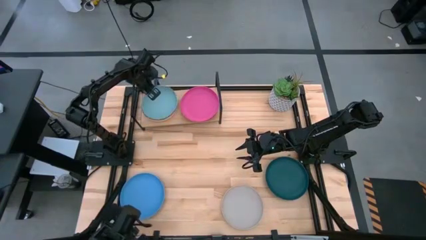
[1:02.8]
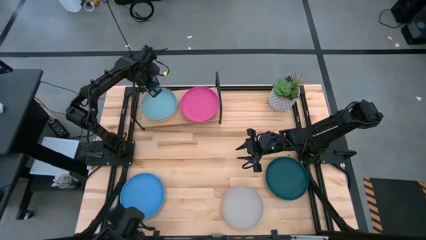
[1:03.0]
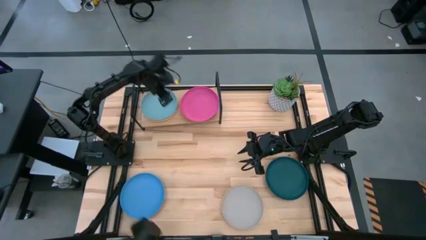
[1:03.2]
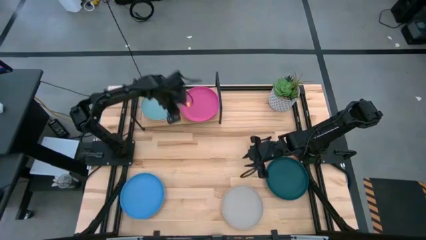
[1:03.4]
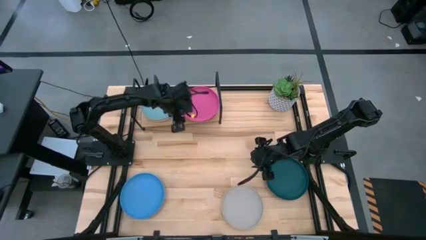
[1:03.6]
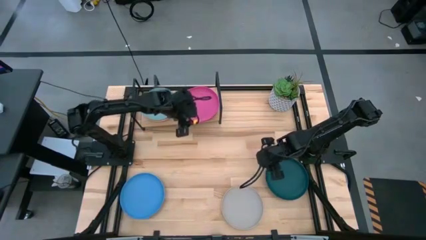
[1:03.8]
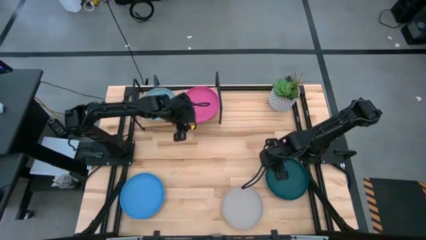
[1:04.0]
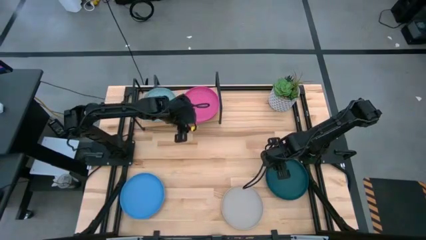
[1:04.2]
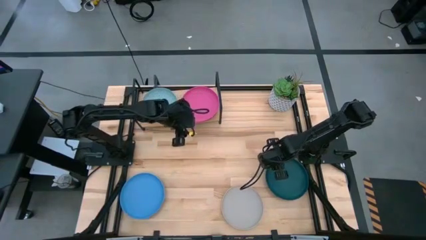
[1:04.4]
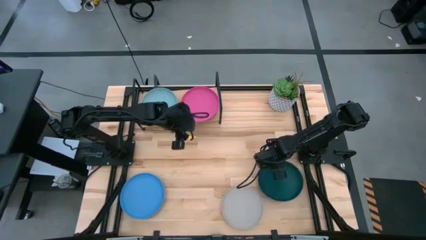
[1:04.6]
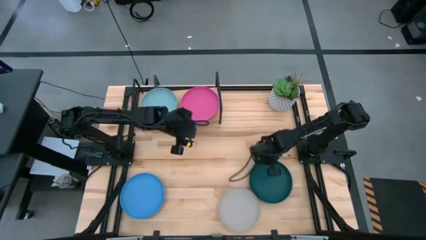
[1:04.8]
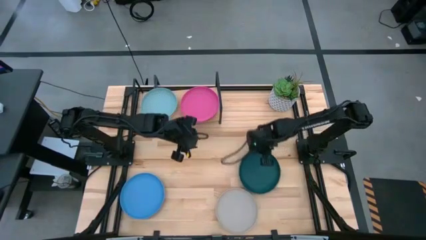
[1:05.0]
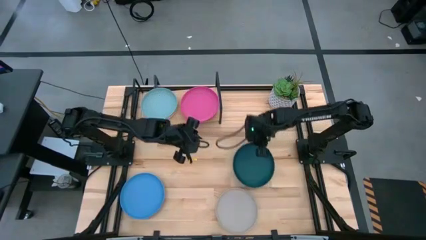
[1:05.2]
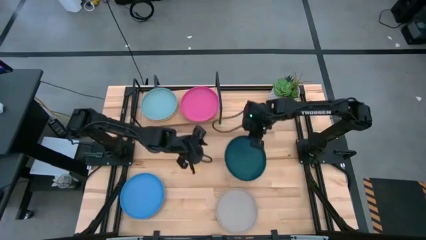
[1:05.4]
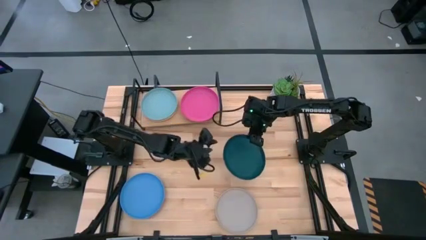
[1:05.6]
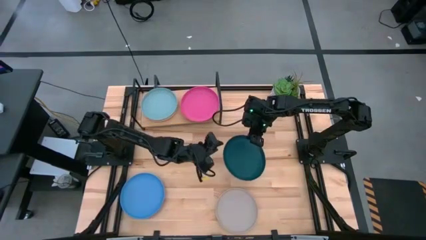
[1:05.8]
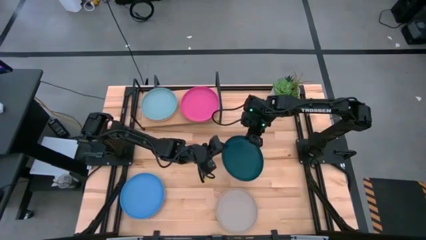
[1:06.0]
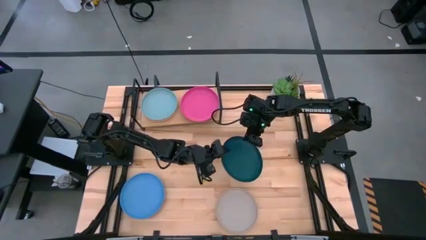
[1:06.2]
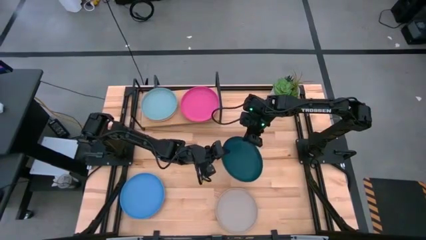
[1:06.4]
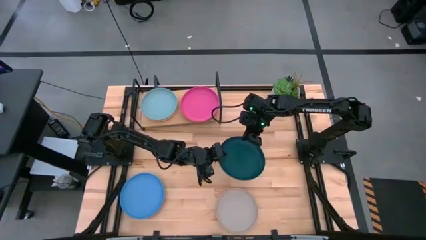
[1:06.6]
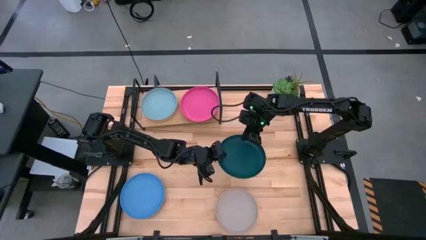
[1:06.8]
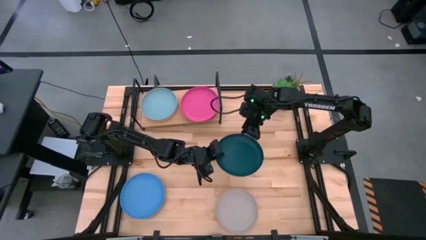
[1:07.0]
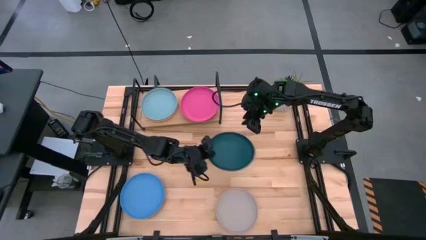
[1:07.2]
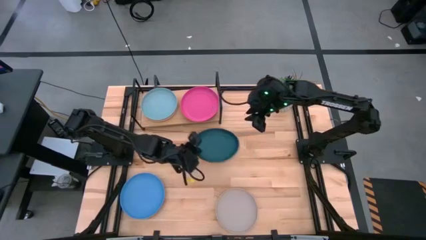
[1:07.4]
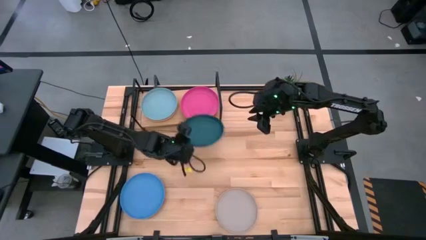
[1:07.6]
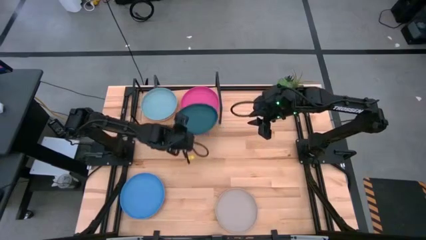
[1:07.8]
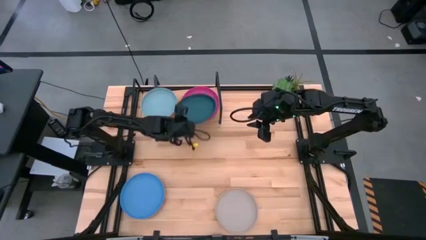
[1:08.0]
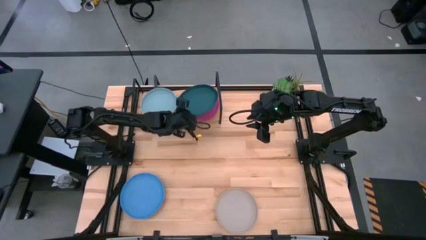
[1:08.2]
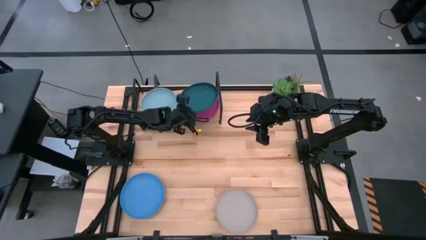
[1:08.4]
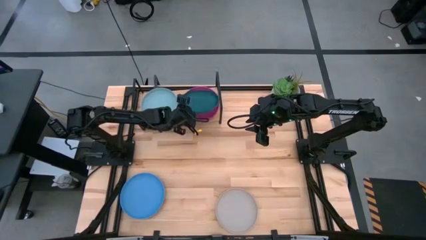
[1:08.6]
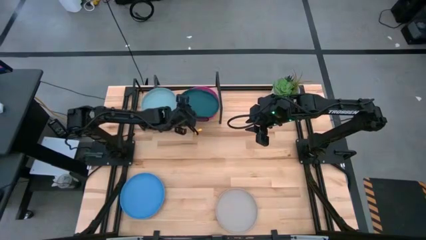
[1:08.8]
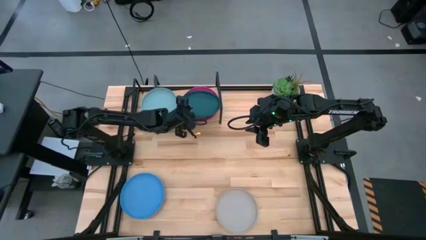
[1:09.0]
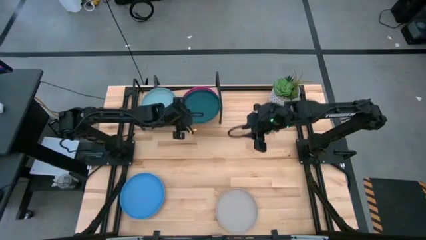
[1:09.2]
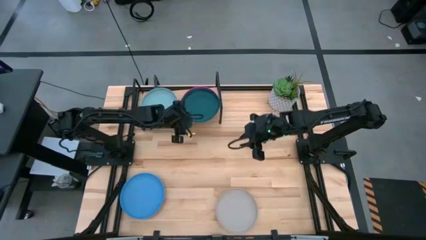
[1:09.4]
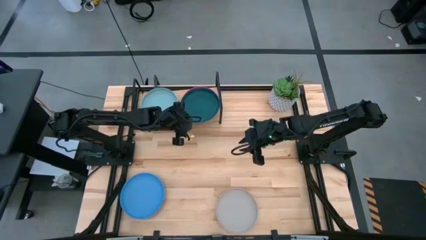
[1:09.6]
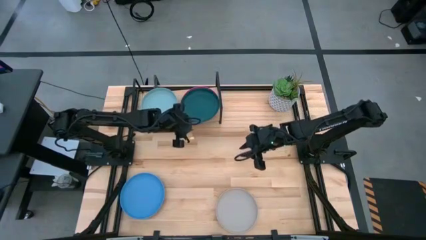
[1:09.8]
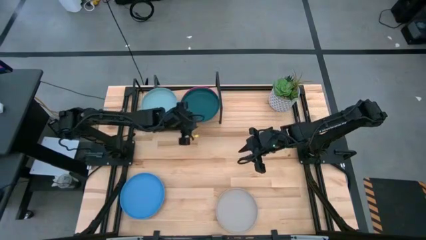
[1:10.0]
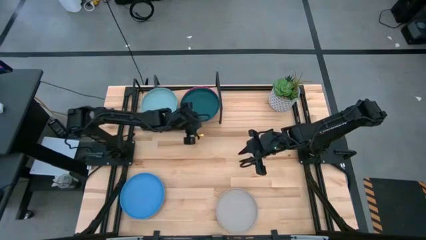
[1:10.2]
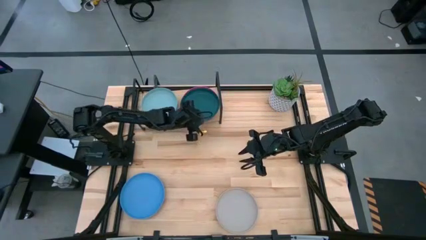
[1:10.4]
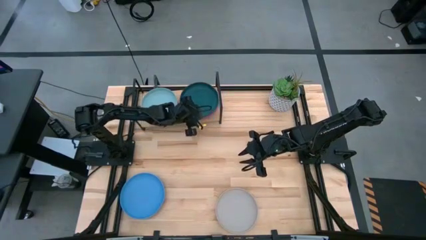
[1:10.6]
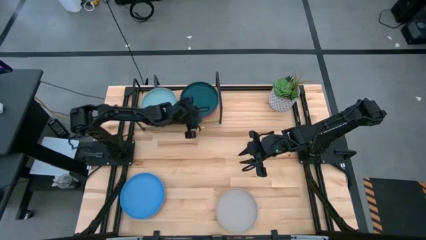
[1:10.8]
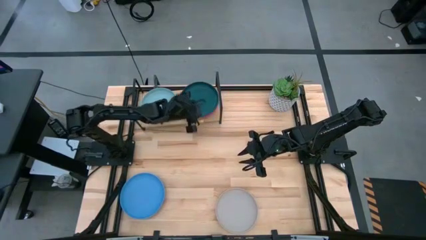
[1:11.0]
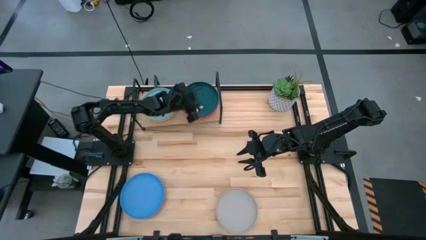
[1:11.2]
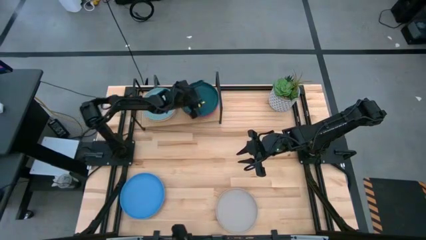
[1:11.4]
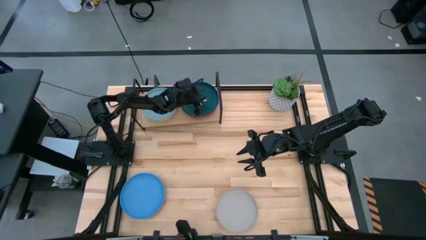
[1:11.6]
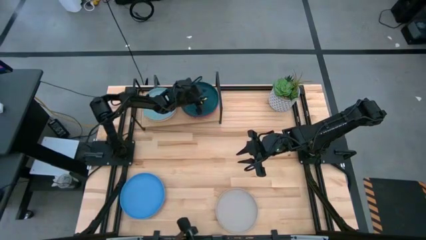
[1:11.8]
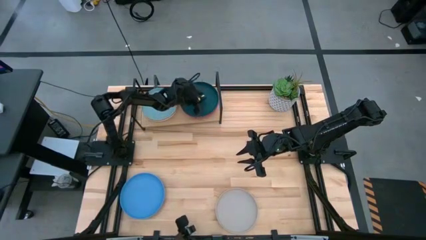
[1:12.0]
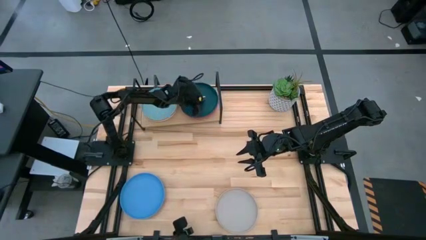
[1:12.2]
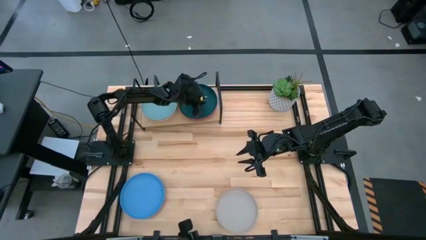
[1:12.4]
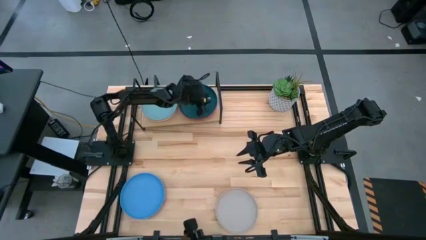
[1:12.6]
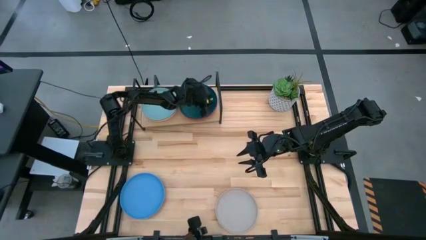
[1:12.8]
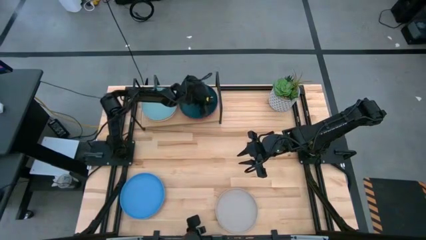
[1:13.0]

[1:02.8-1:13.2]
Task: Place and stack plates onto a shelf
Stack the dark blue plate on the pink plate

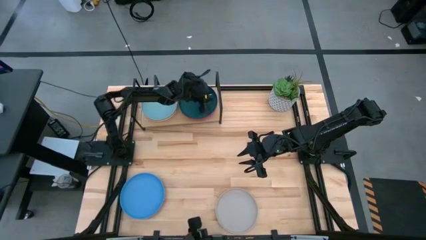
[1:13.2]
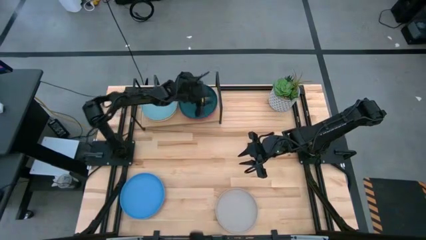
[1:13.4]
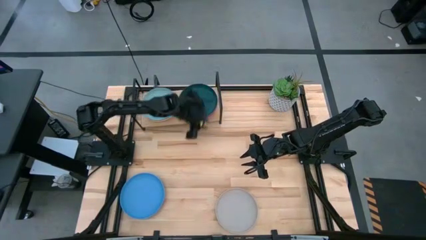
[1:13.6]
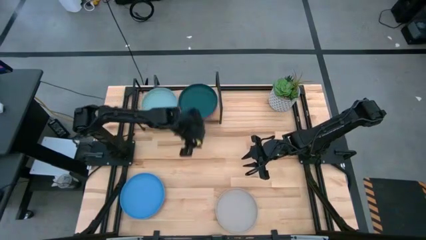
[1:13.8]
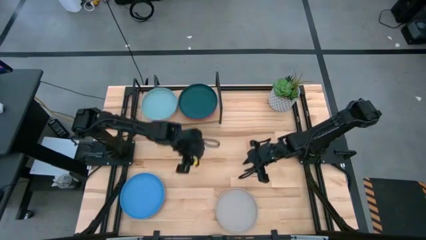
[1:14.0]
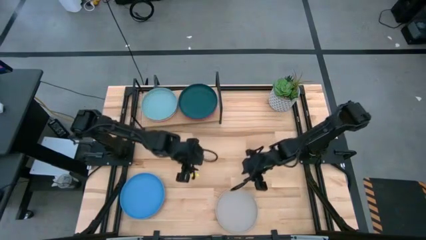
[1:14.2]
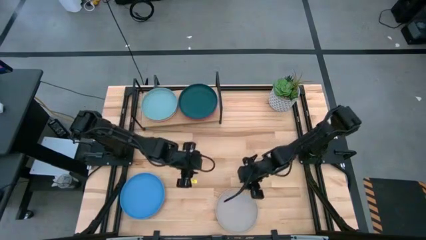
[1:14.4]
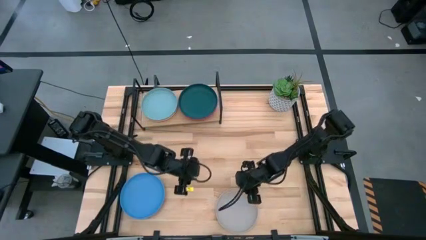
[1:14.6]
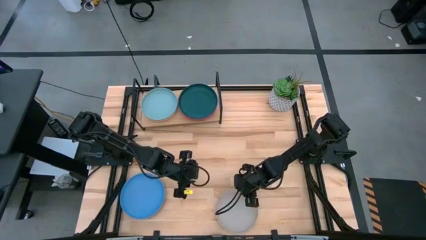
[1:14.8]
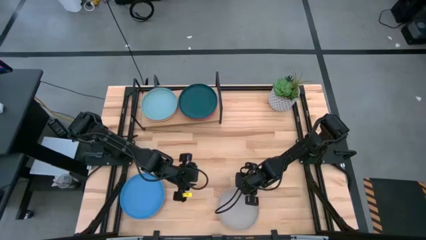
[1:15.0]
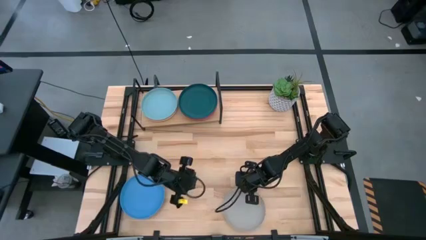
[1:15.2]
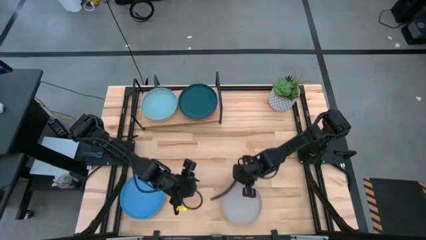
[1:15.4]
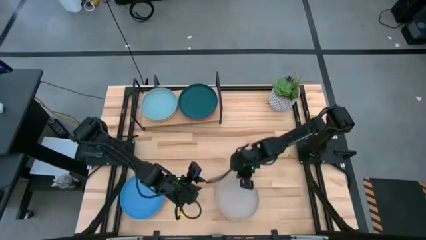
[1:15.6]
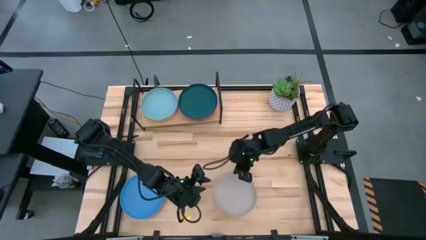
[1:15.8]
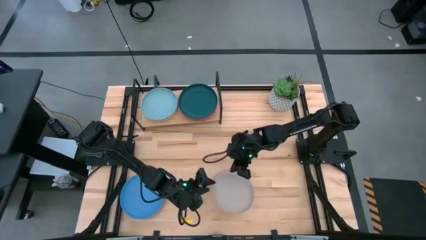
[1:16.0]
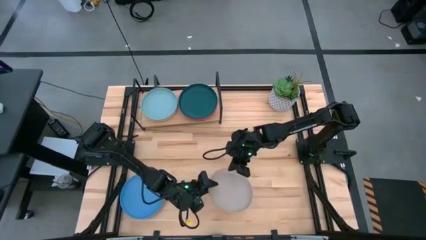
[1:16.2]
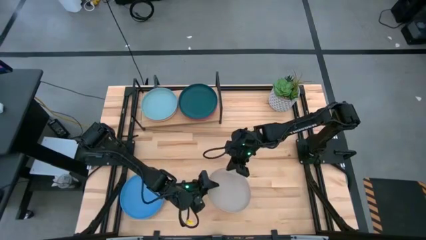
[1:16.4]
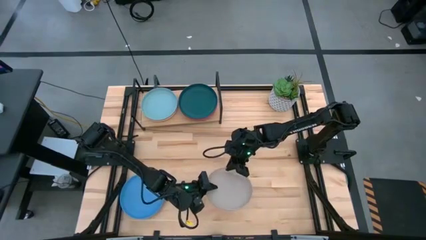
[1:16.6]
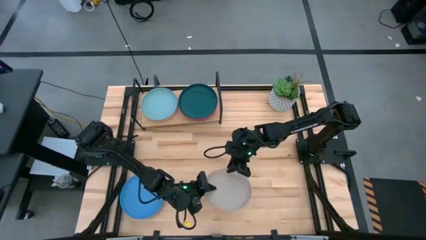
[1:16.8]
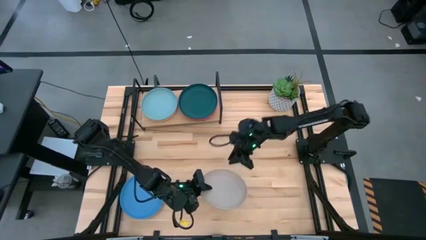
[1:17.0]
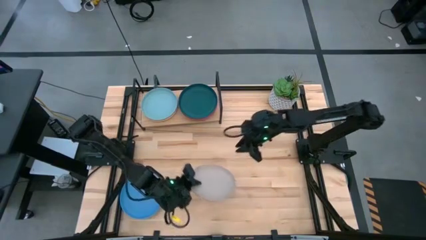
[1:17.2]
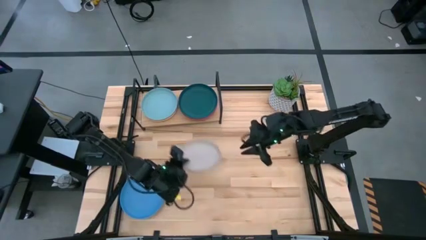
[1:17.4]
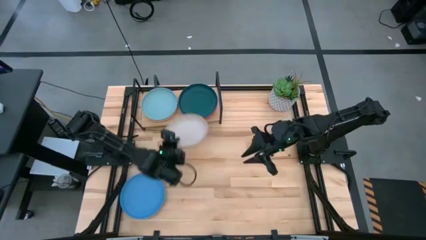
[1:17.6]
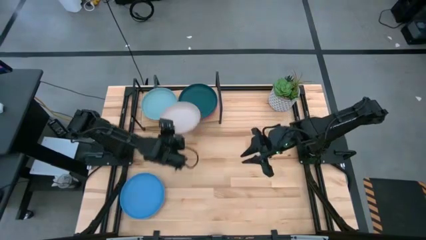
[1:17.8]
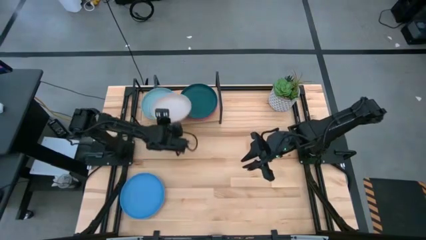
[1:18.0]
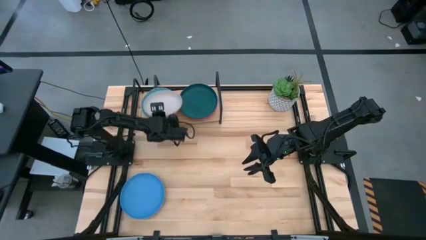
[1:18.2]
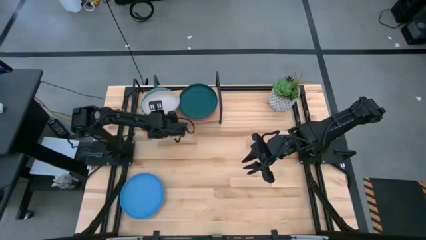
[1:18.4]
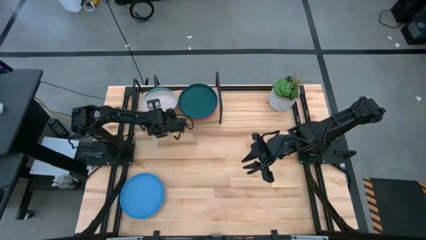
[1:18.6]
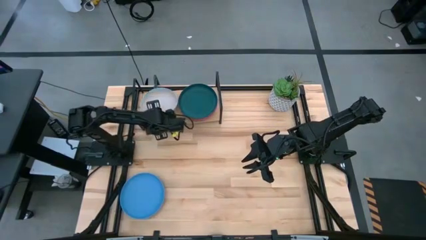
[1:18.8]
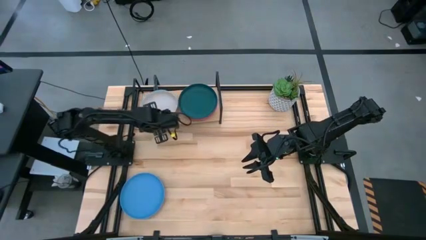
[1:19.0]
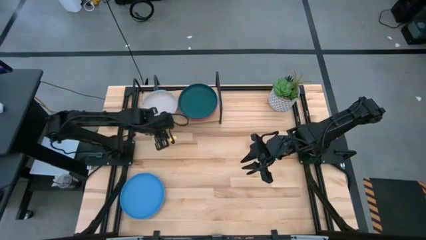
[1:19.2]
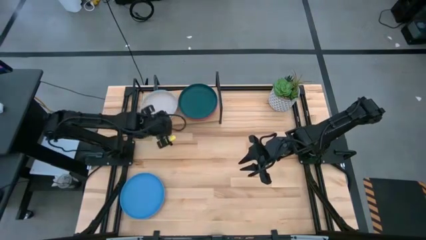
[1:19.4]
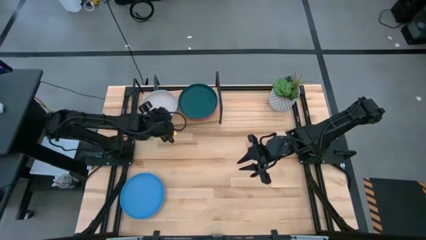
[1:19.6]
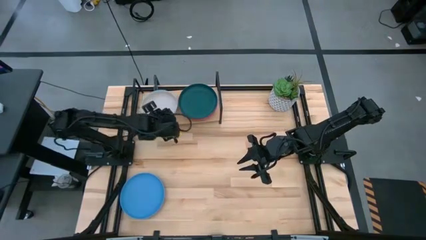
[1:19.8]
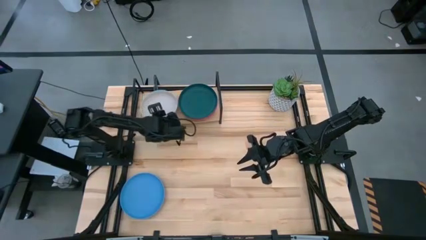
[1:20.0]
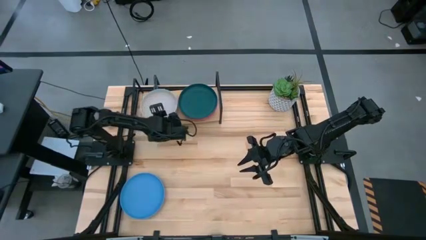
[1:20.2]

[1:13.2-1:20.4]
Stack the grey plate on the light blue plate
